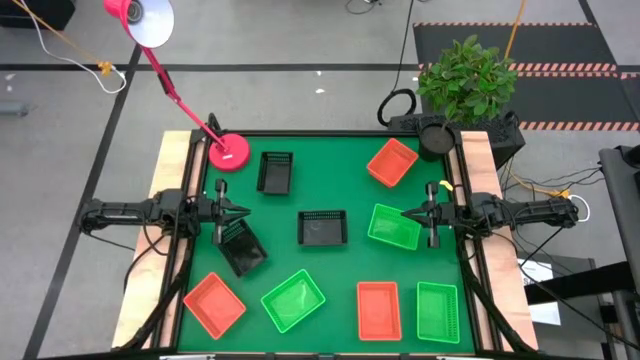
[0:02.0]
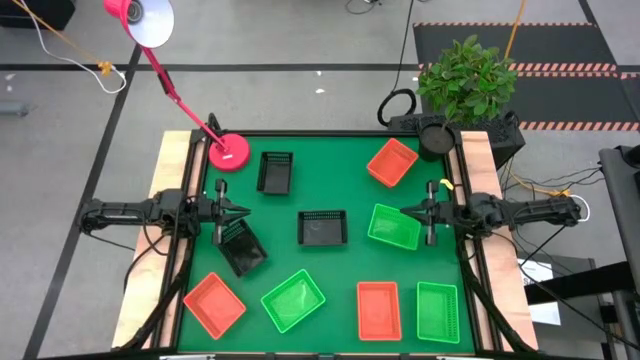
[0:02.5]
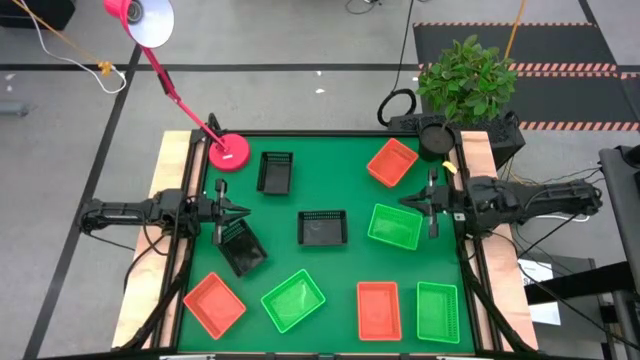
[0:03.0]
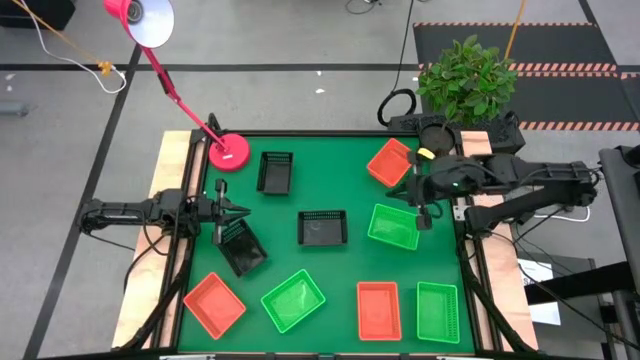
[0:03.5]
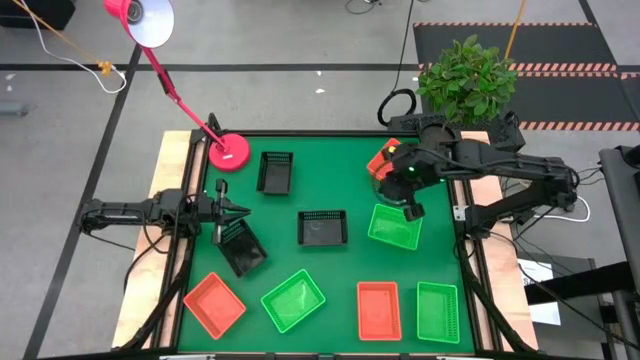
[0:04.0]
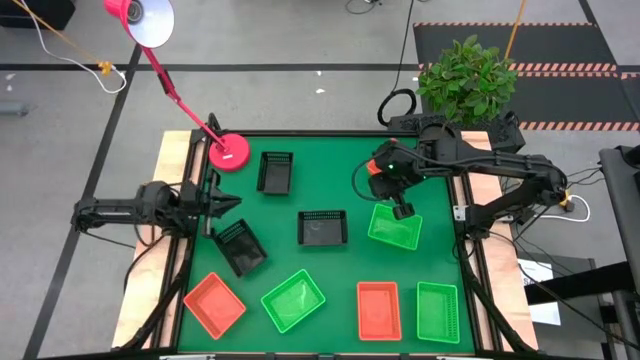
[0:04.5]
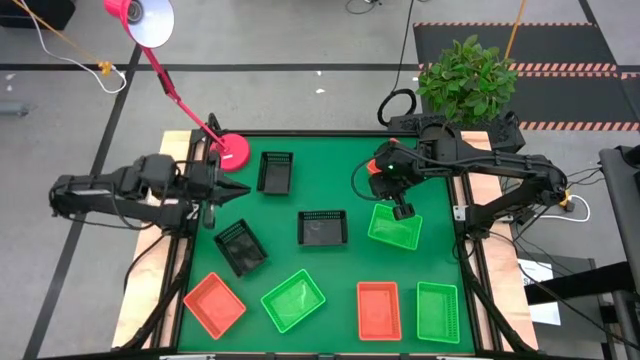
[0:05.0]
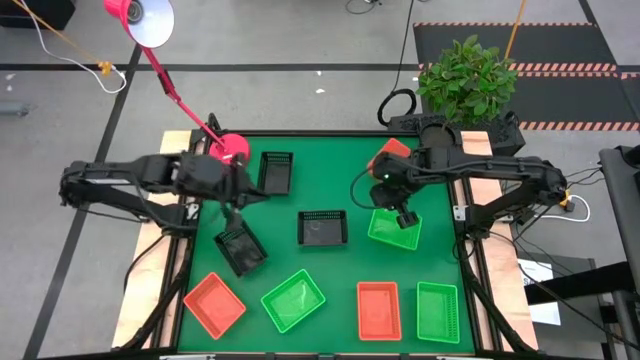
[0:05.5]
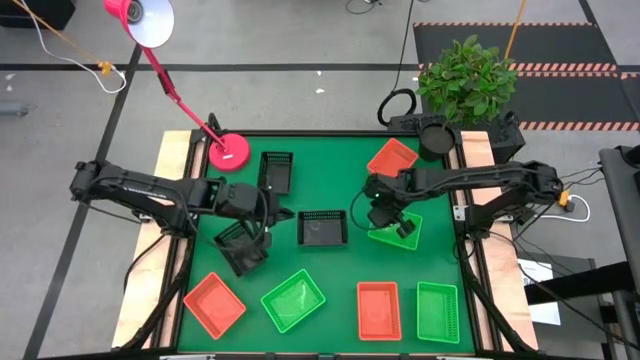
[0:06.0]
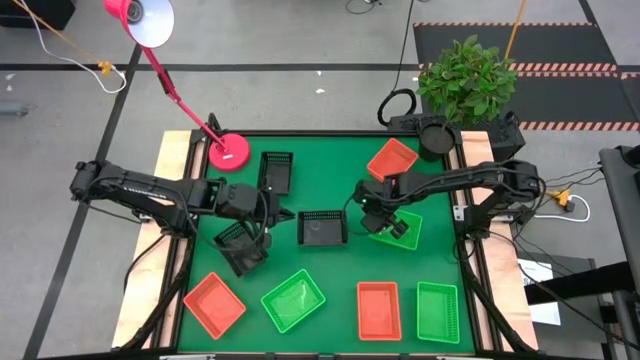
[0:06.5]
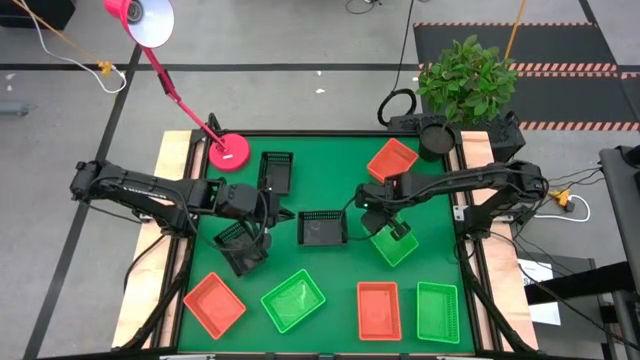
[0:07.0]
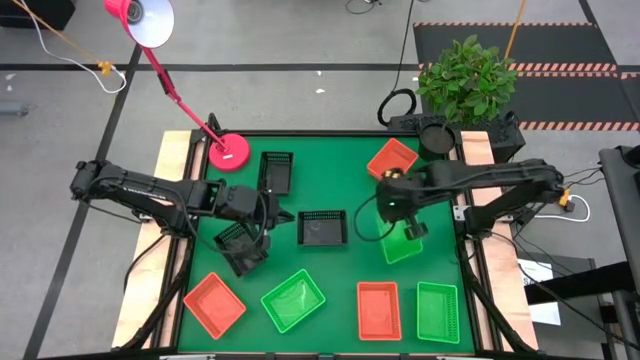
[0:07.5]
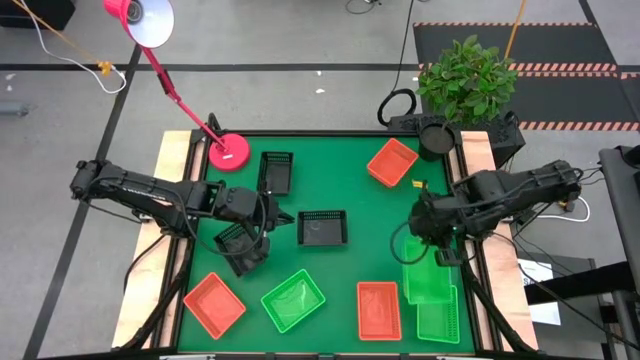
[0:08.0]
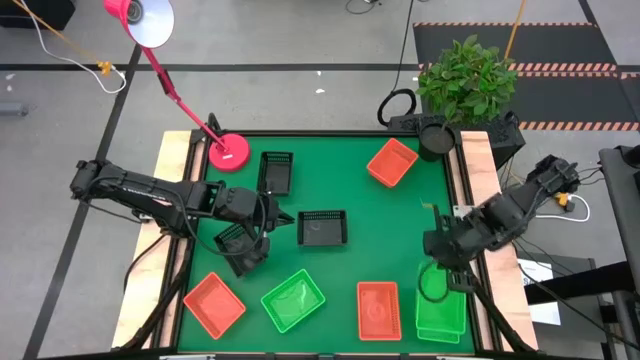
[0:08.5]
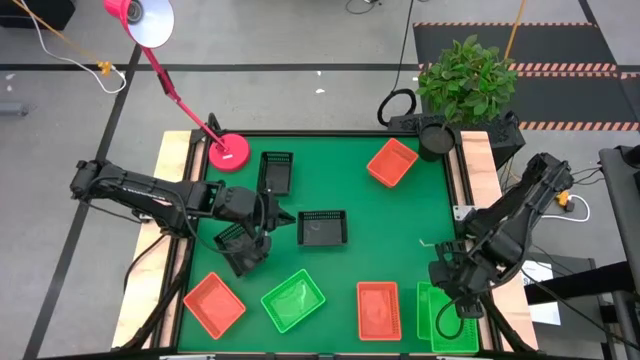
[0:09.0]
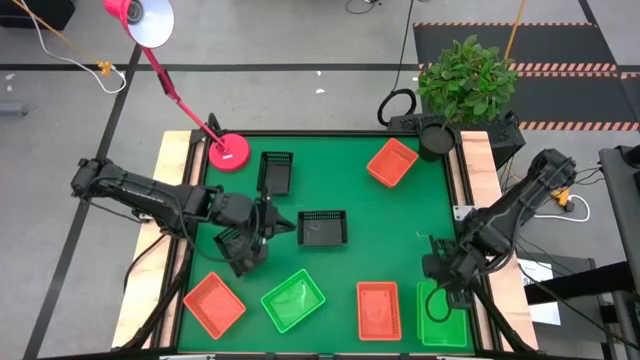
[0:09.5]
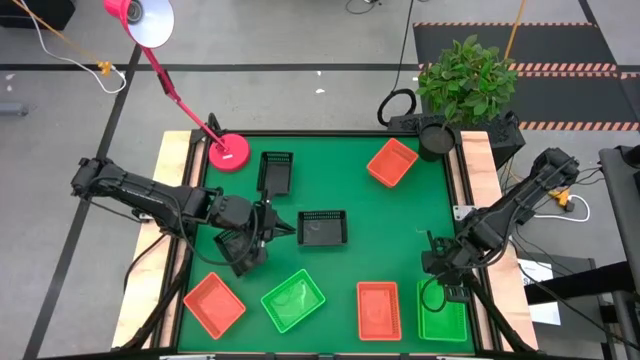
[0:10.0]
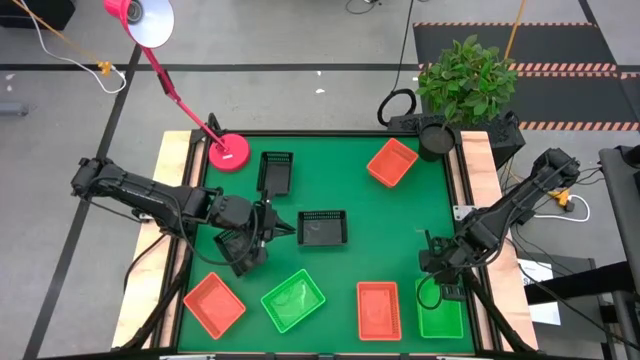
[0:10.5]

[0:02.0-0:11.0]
Stack the top green bin on top of the bottom right green bin

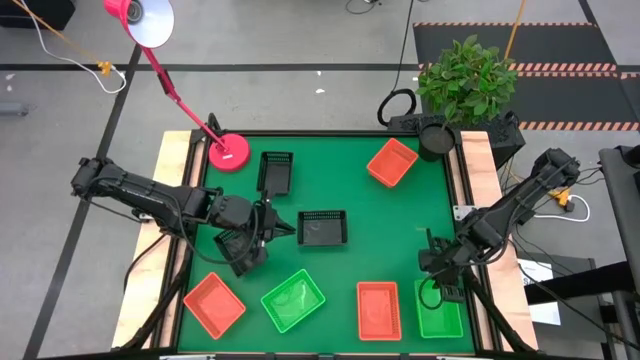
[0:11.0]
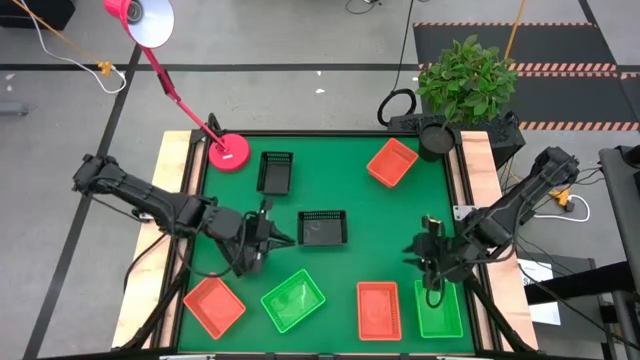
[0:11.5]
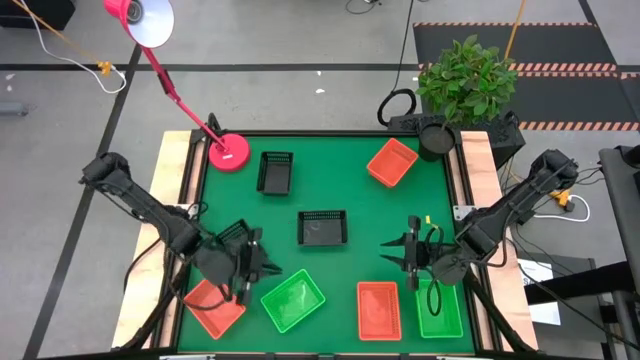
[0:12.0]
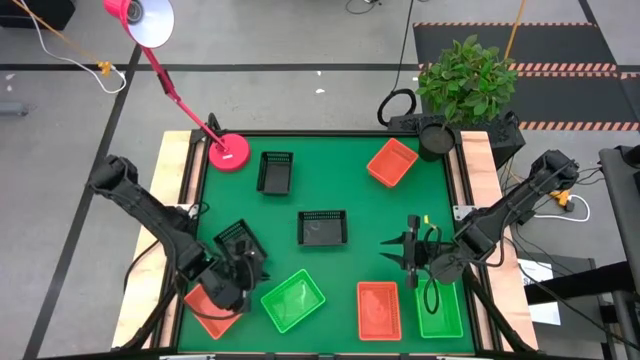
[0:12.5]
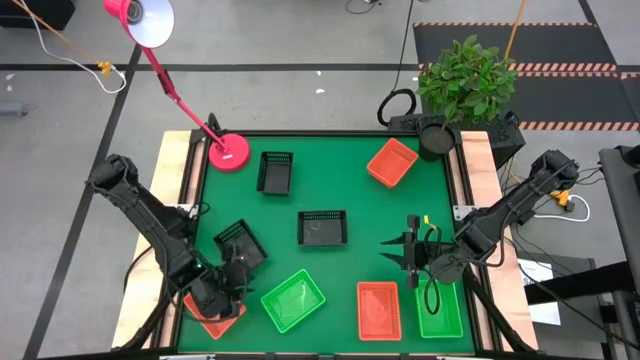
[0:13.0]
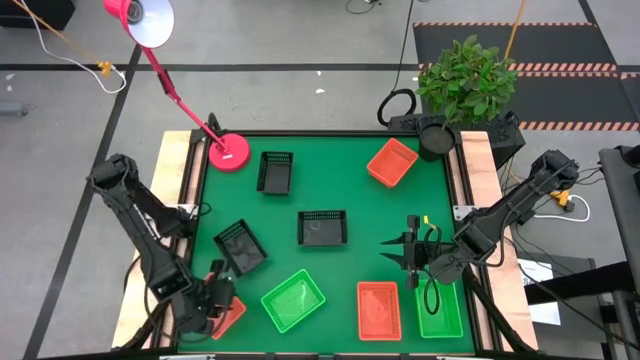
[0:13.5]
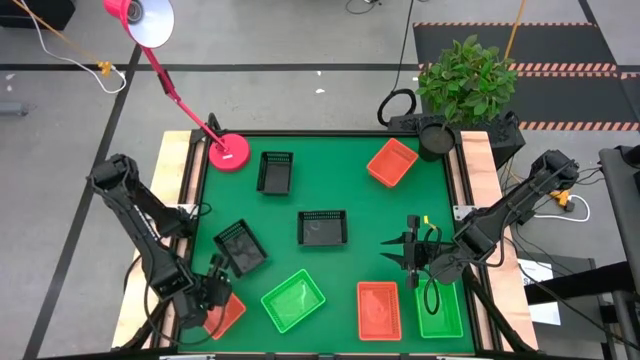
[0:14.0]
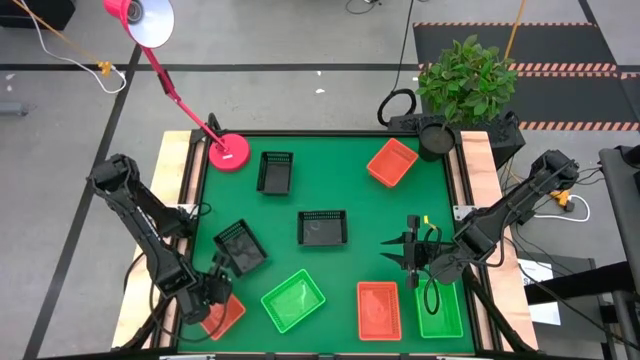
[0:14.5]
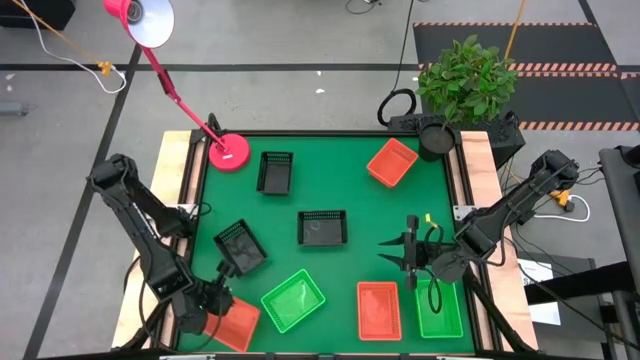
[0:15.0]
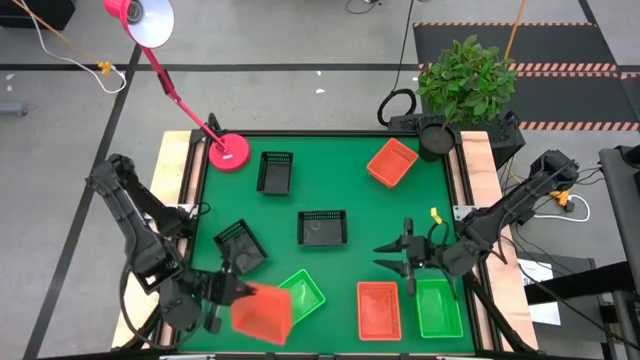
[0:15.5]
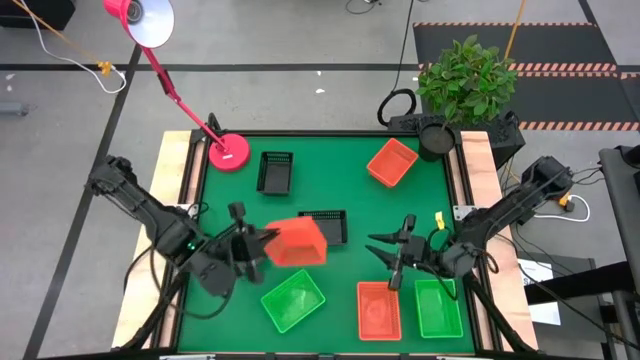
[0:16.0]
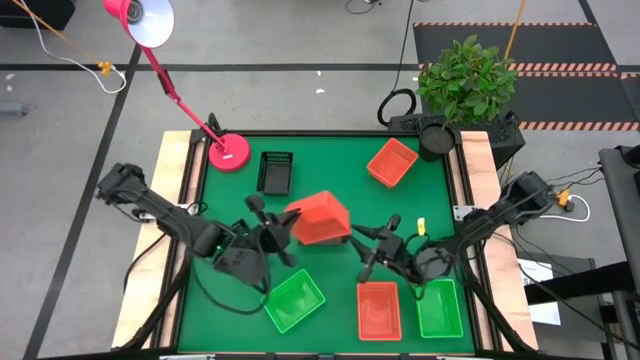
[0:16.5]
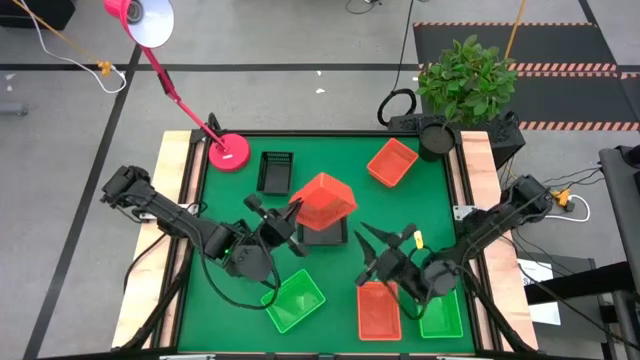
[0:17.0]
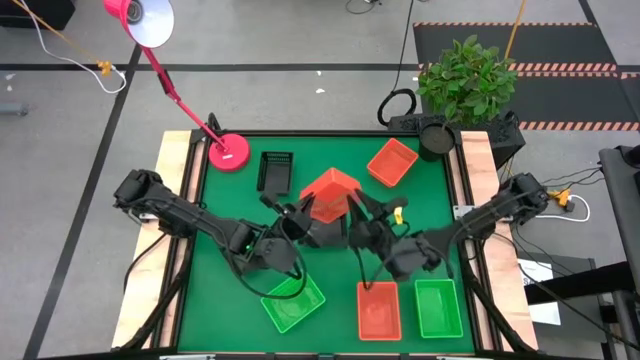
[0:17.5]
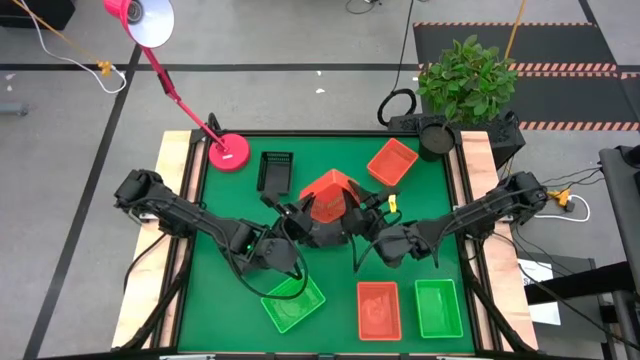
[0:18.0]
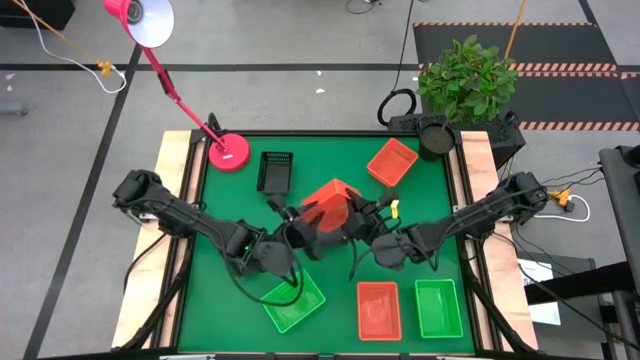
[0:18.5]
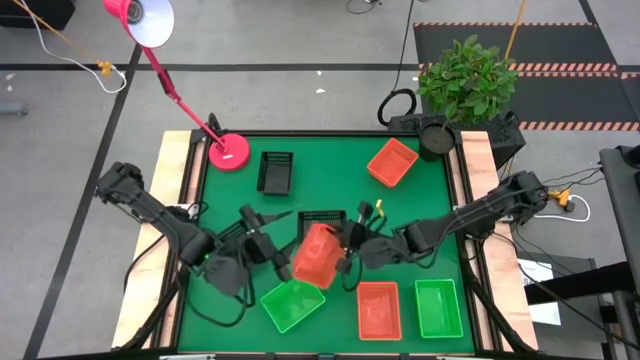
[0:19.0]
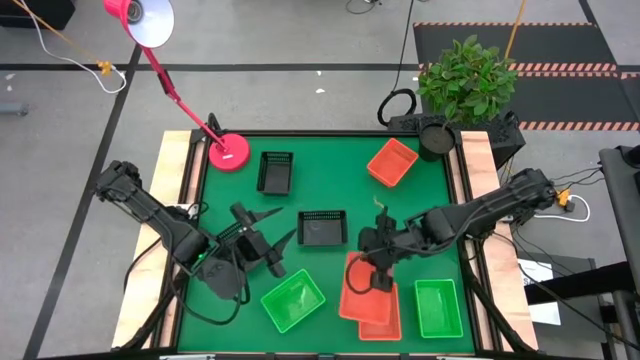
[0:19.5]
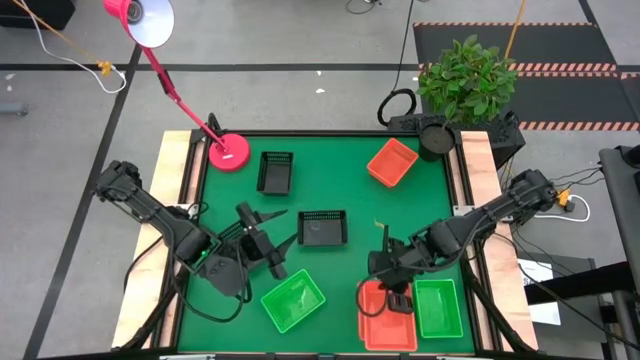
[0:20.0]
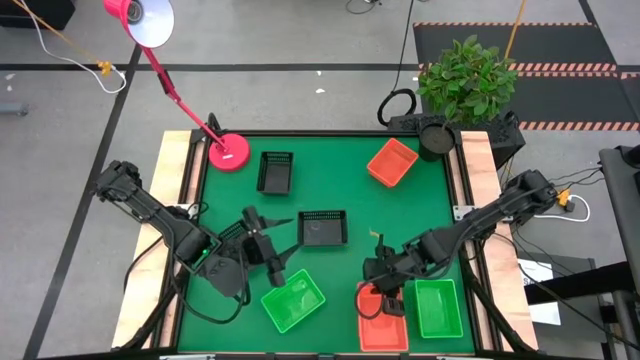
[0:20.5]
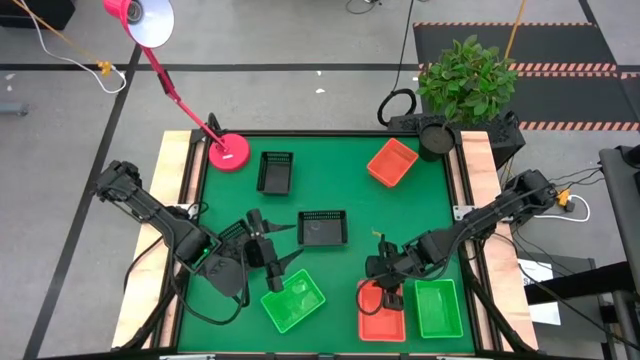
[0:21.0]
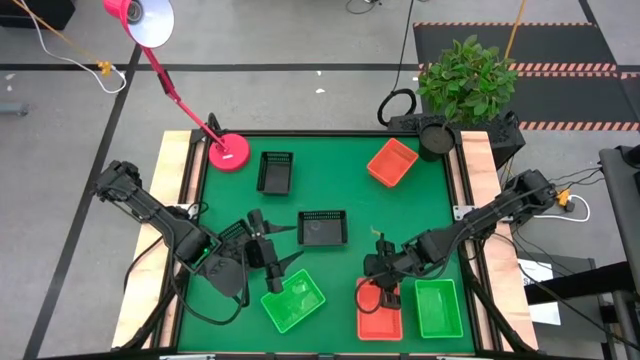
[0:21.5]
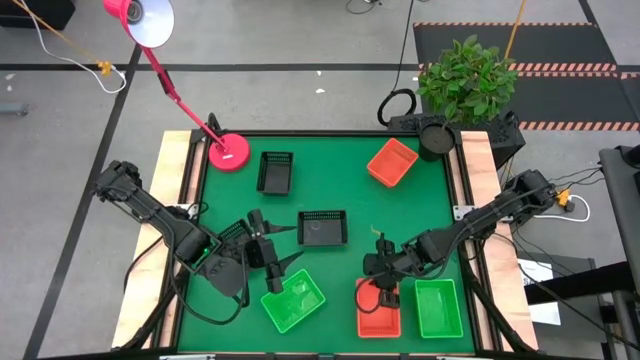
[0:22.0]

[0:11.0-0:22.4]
Stack the bottom left orange bin on top of the bottom right orange bin
